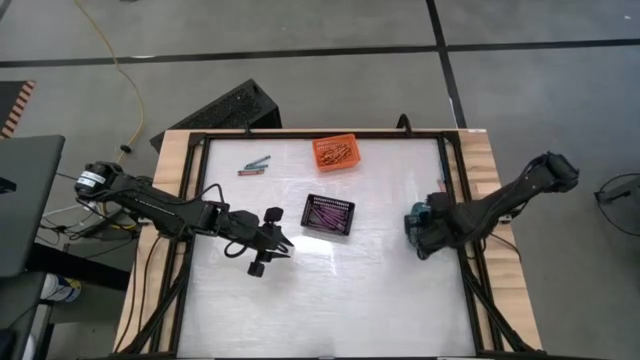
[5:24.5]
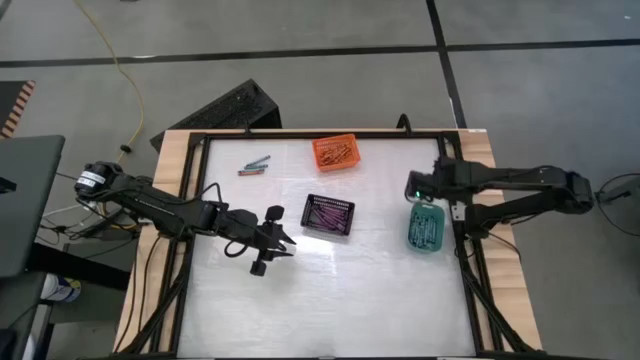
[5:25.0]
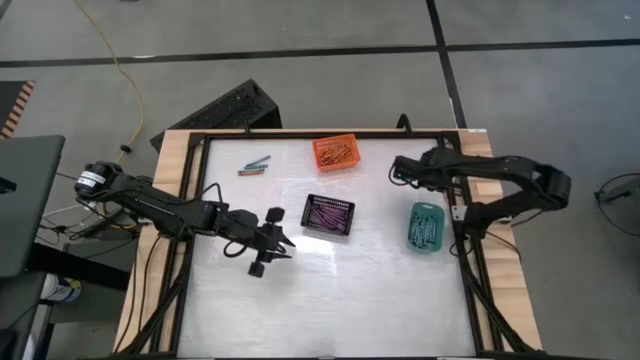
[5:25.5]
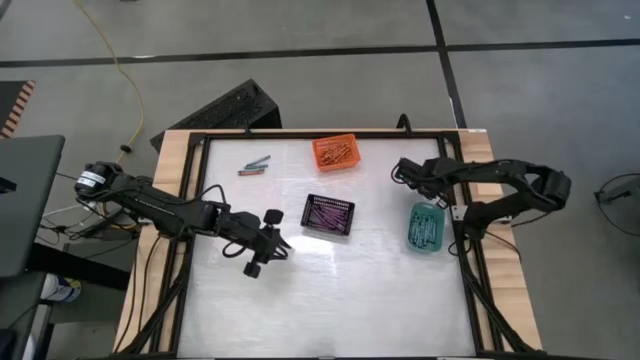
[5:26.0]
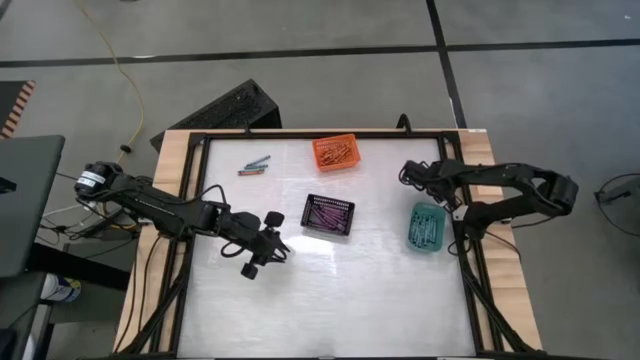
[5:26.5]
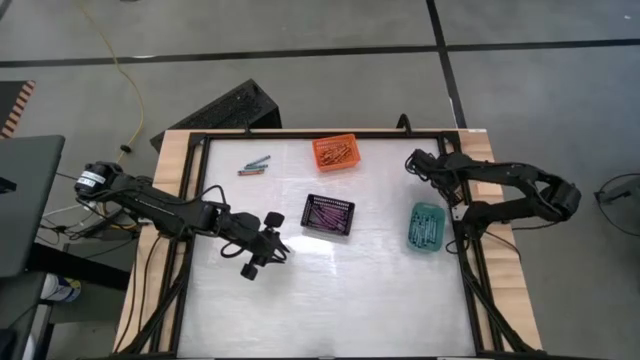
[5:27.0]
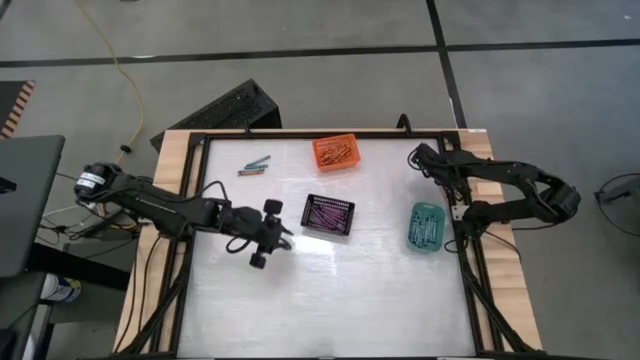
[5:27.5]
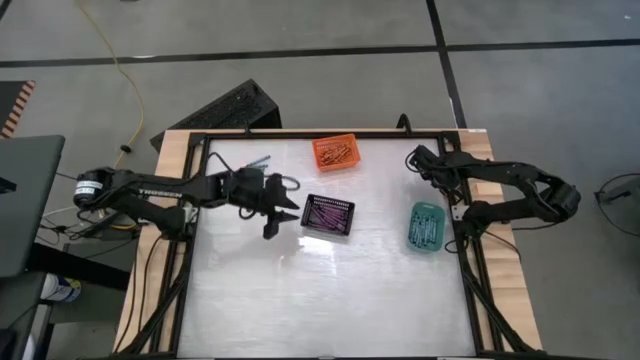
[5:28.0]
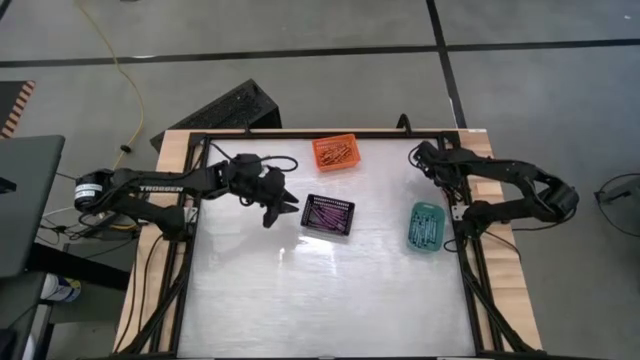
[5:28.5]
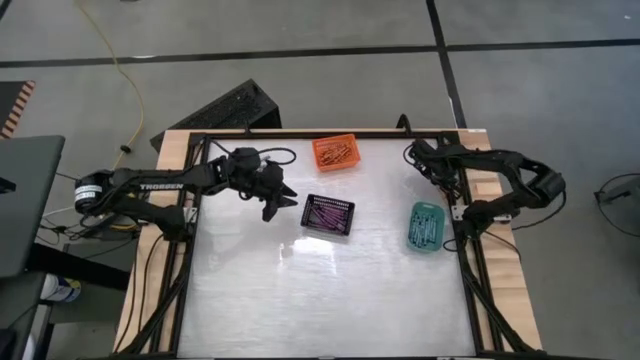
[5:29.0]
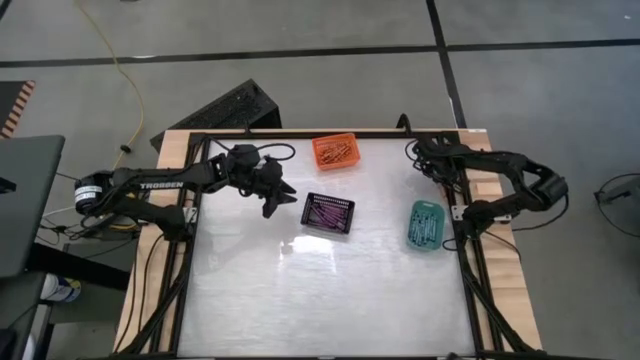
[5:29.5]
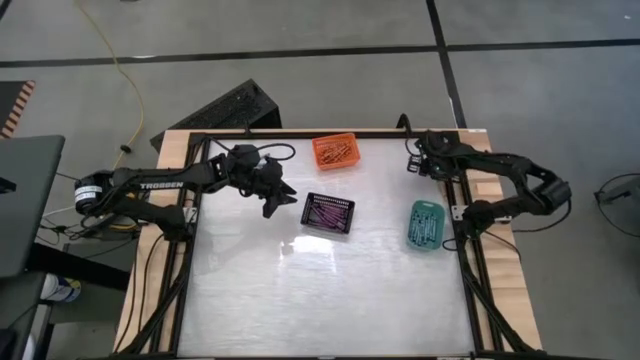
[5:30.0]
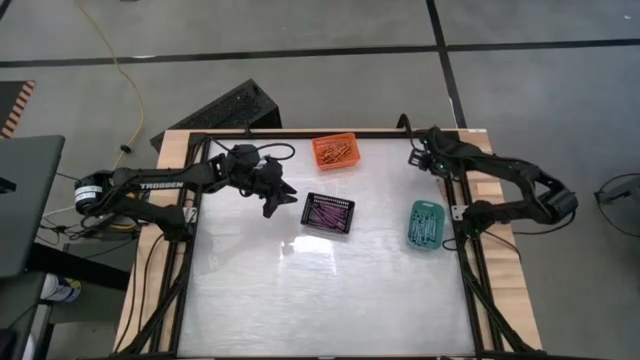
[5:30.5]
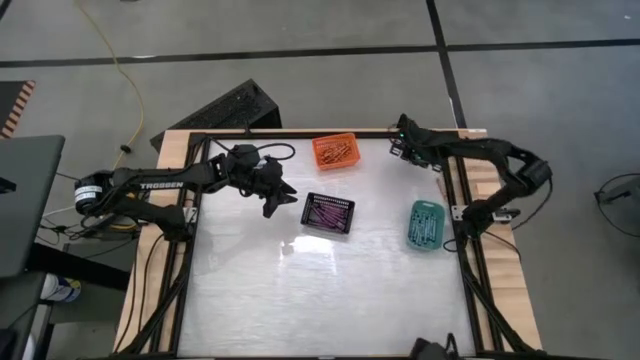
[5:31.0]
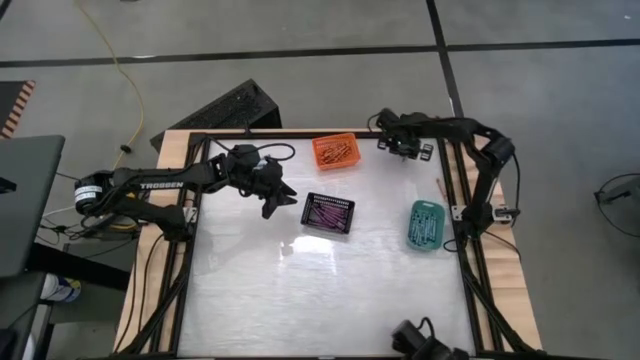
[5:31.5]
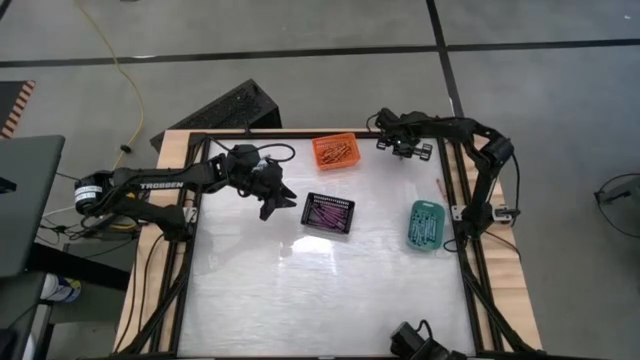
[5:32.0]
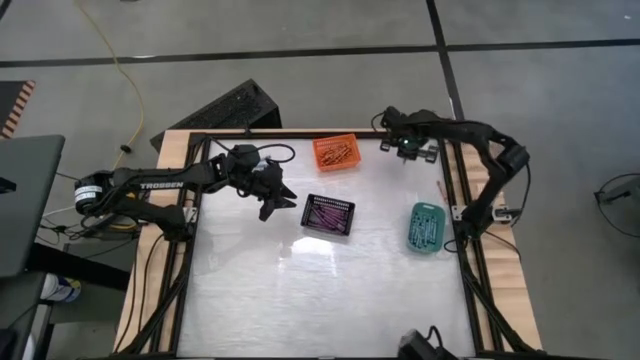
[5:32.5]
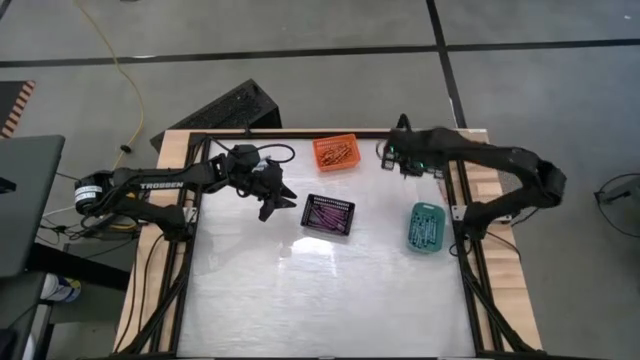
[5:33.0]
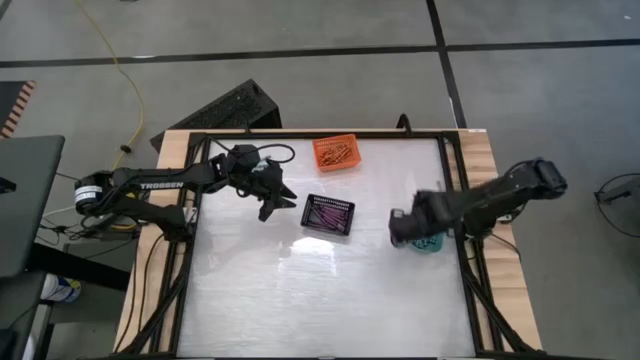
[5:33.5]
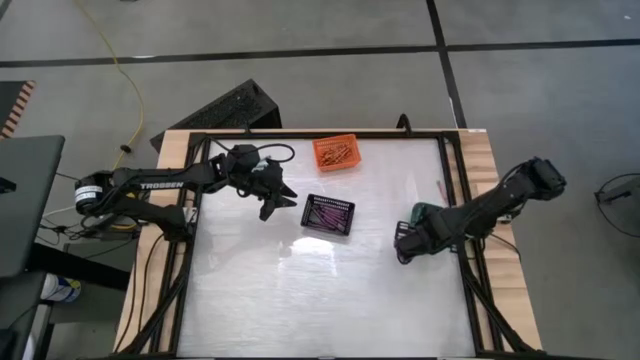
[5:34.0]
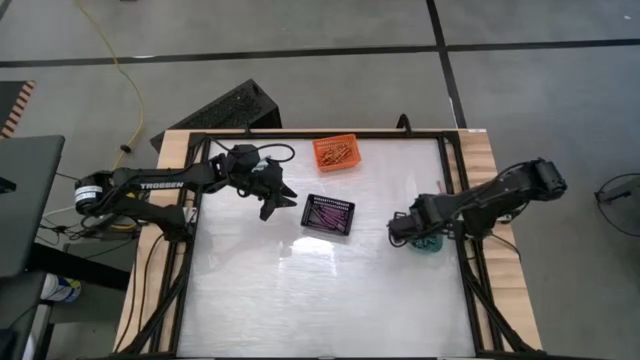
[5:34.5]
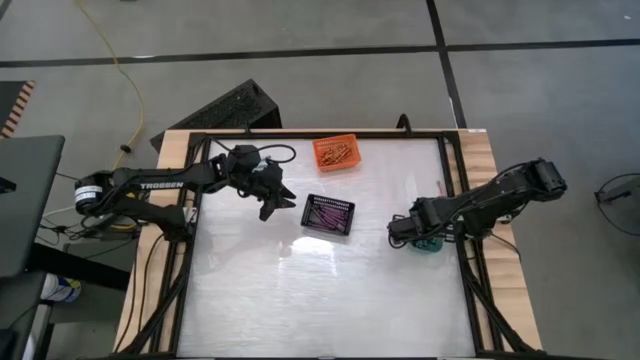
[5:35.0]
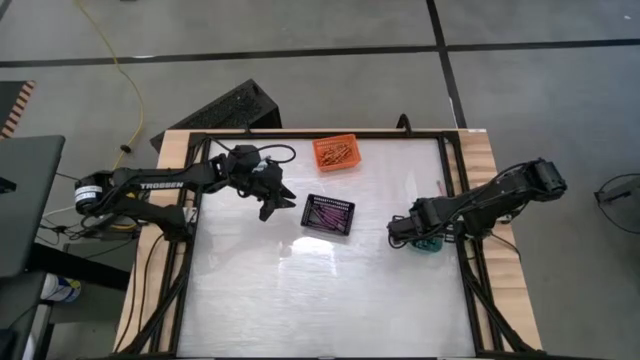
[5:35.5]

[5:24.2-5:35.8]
Task: Sort crayons
Put the light blue green crayon into the green bin

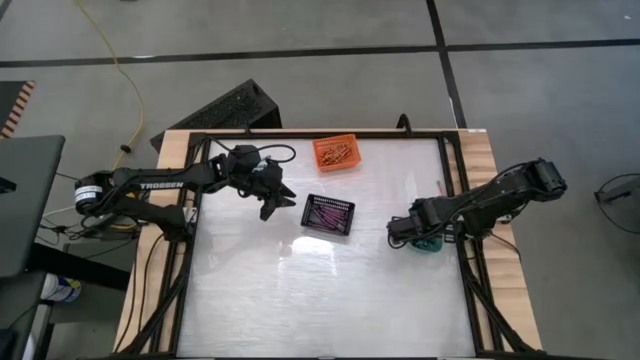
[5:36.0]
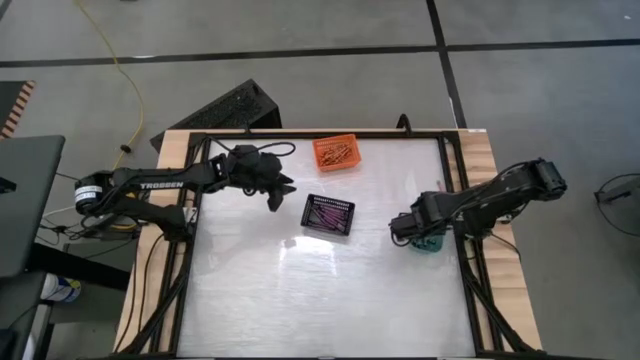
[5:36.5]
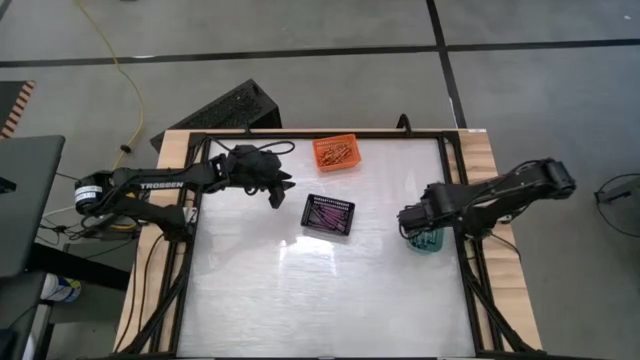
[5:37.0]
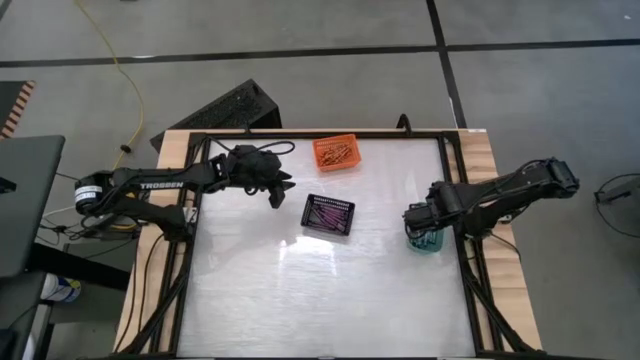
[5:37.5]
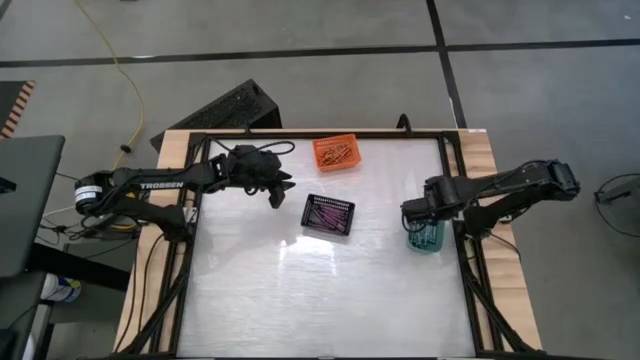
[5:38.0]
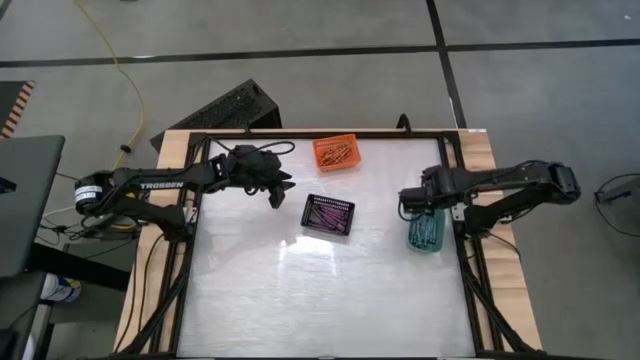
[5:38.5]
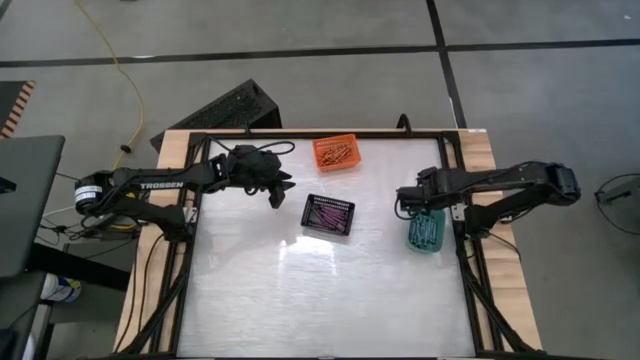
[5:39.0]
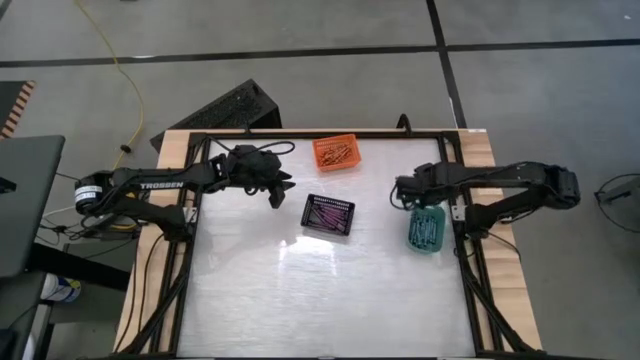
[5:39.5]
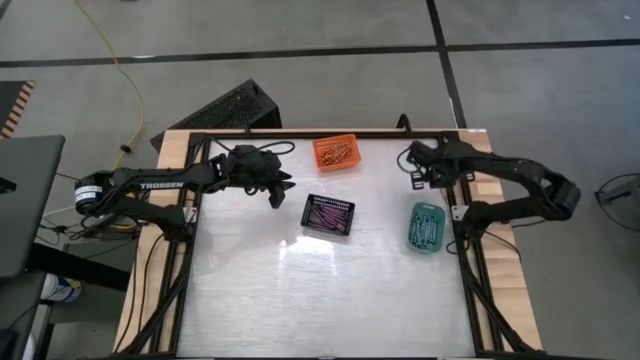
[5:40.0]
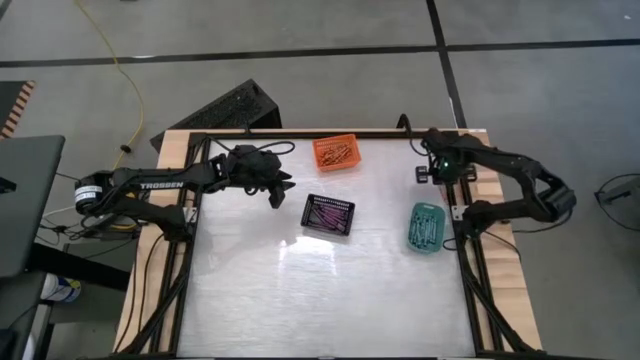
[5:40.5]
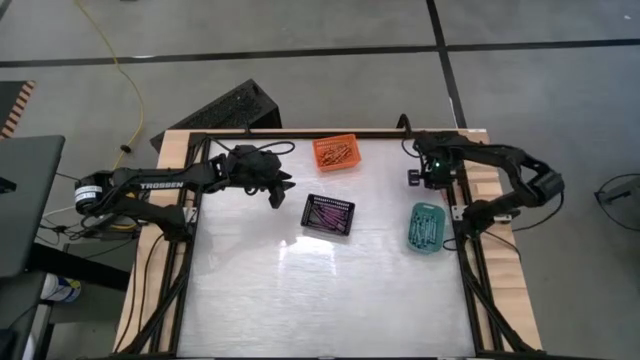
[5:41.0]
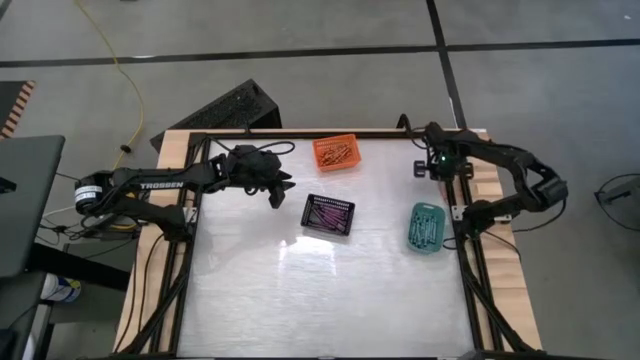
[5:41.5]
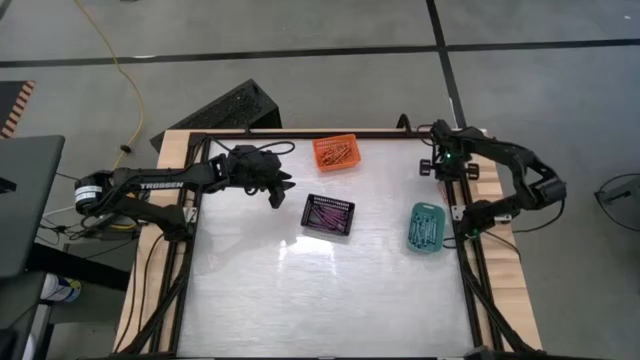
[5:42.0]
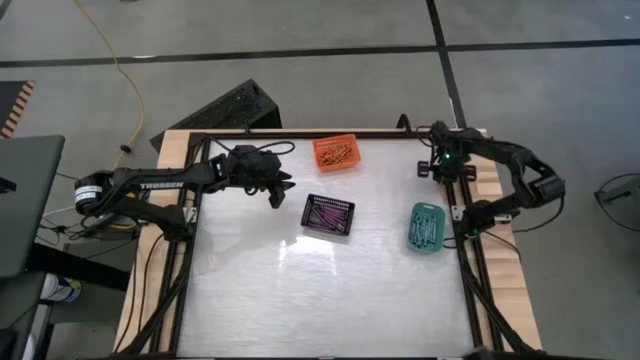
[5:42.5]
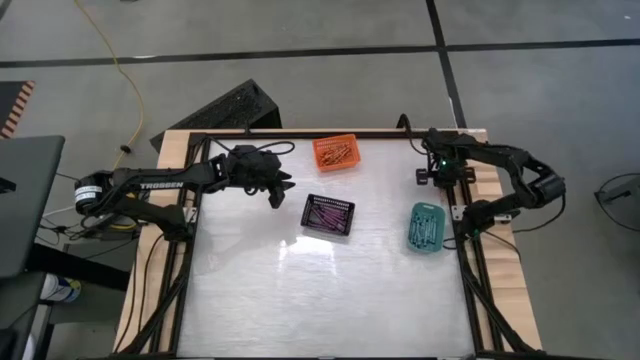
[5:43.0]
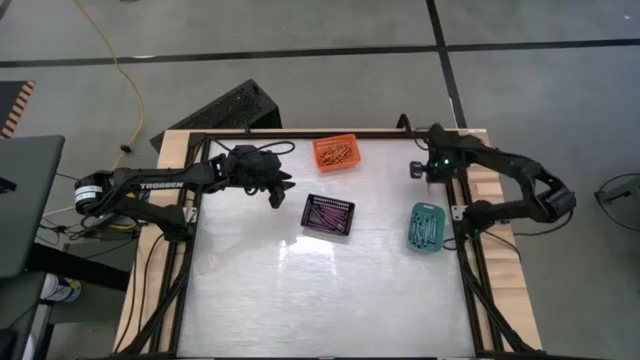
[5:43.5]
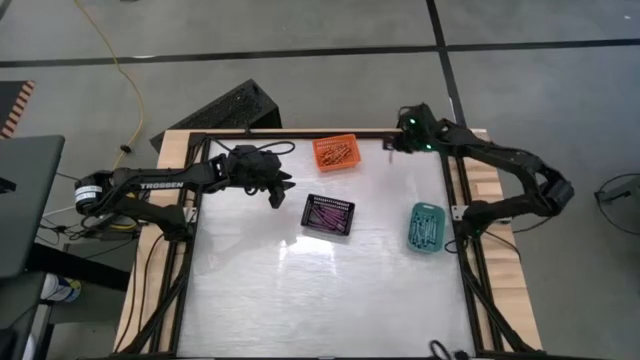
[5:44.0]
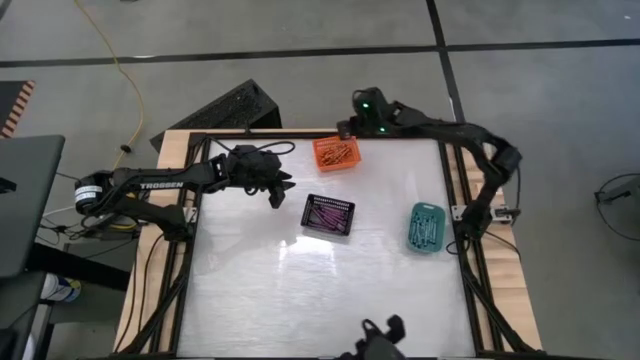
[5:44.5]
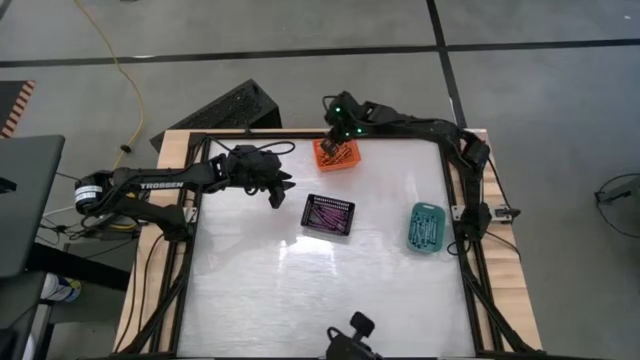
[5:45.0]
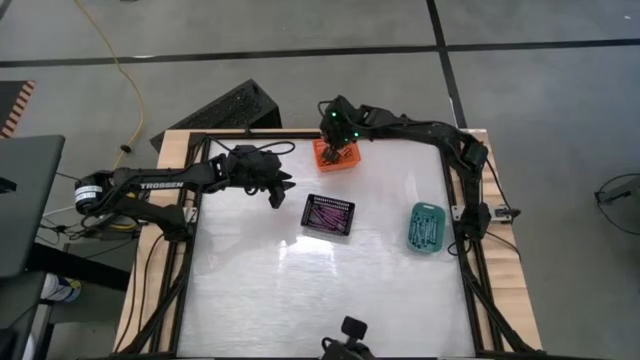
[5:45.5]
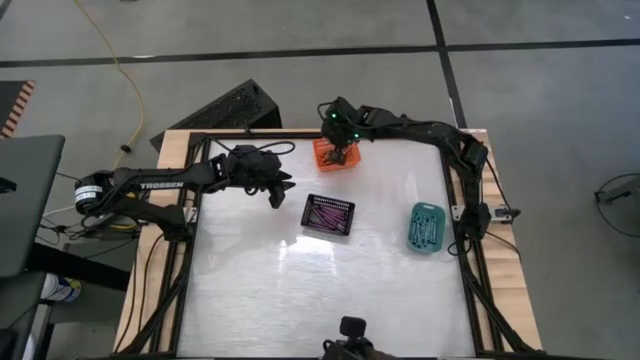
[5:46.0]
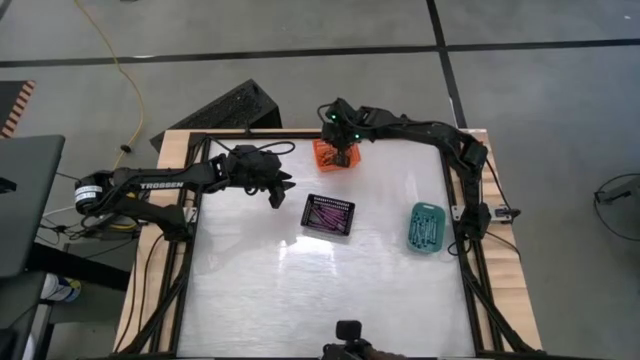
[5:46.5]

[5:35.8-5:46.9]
Put the orange crayon into the orange bin
